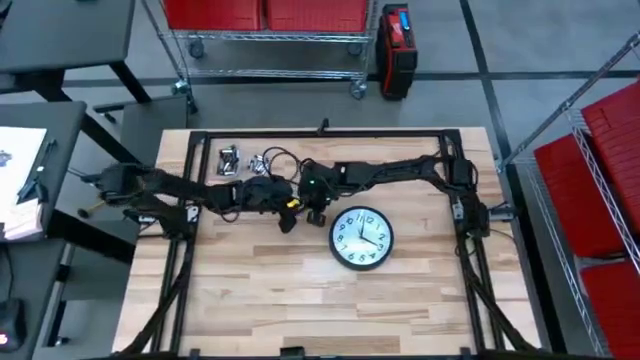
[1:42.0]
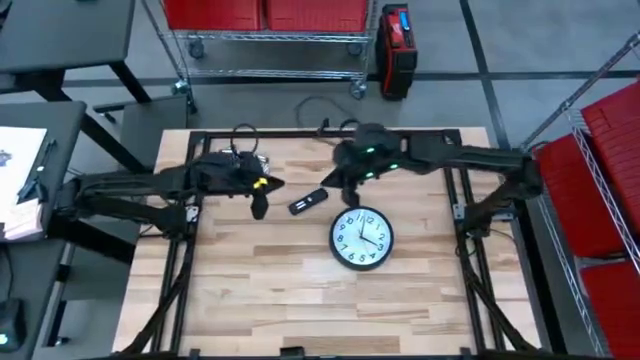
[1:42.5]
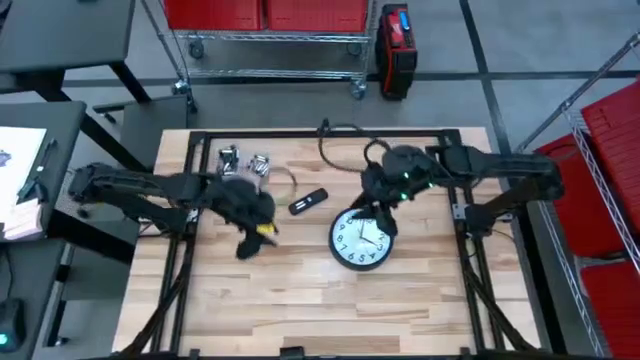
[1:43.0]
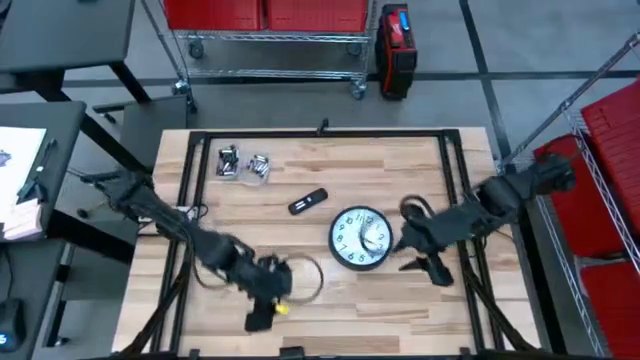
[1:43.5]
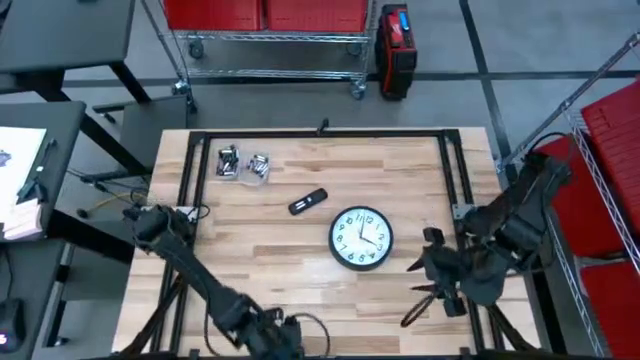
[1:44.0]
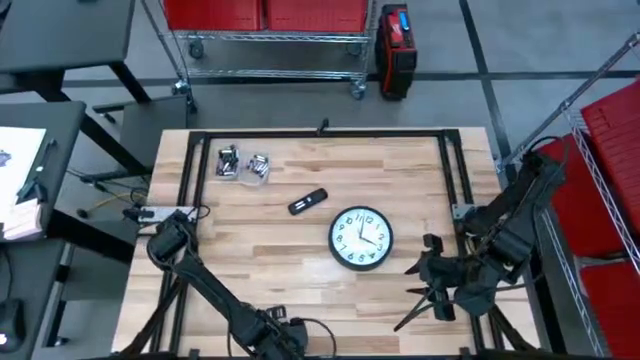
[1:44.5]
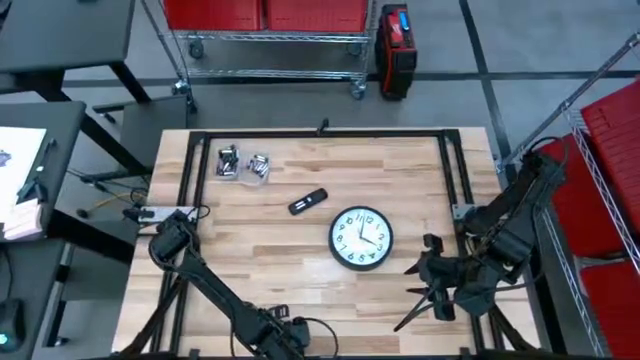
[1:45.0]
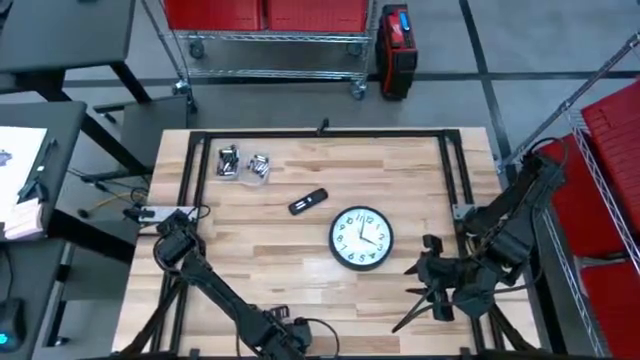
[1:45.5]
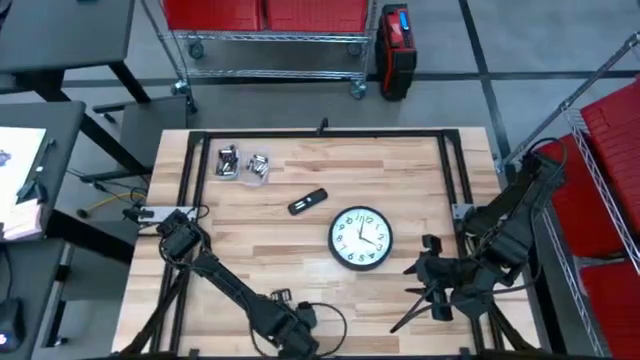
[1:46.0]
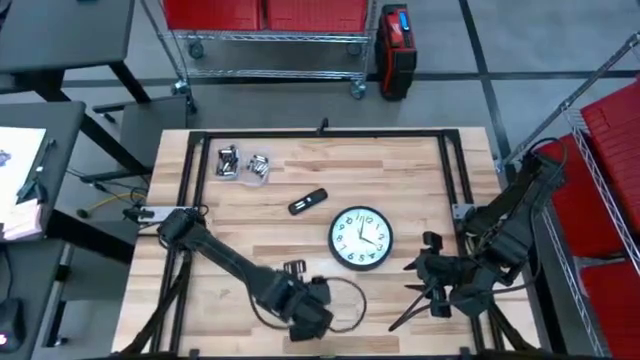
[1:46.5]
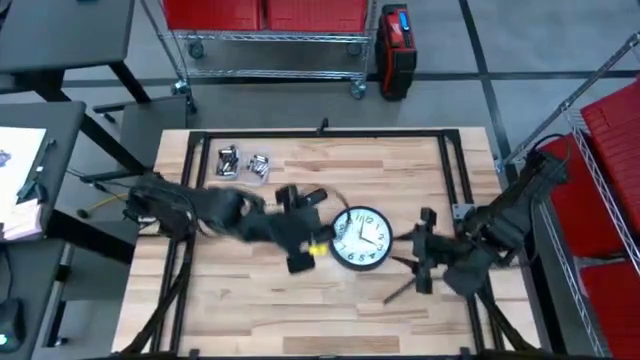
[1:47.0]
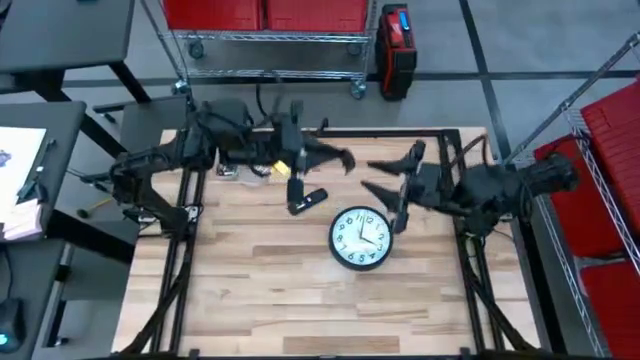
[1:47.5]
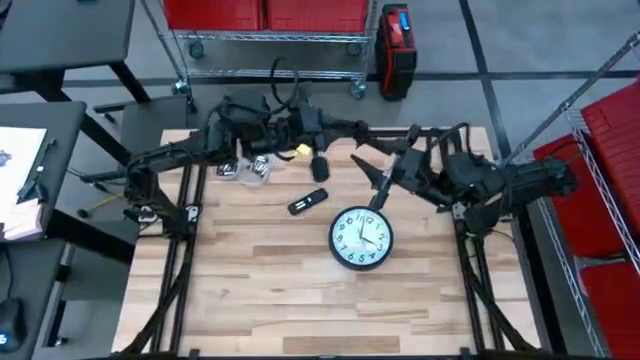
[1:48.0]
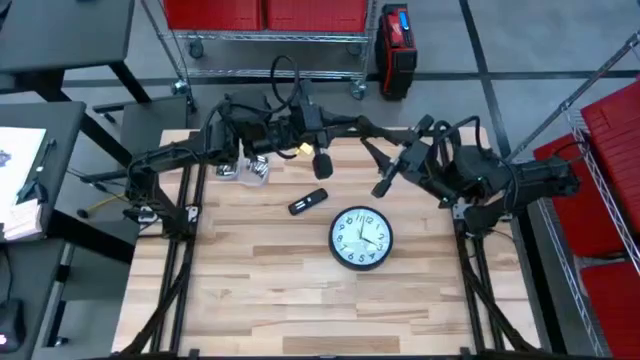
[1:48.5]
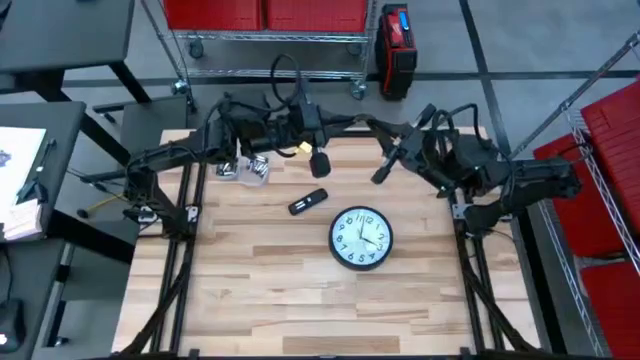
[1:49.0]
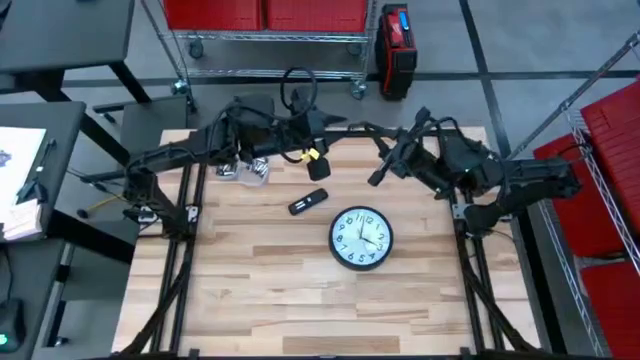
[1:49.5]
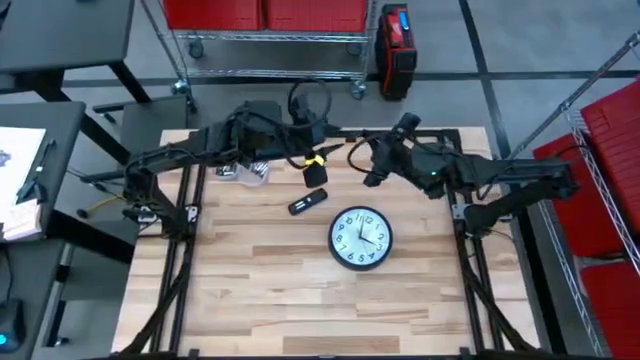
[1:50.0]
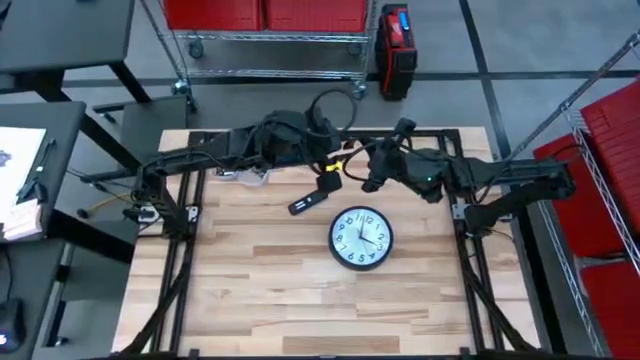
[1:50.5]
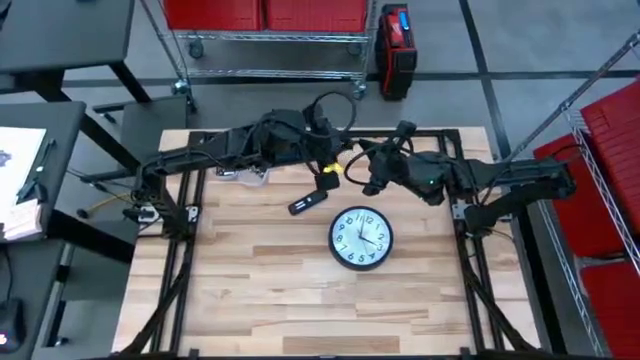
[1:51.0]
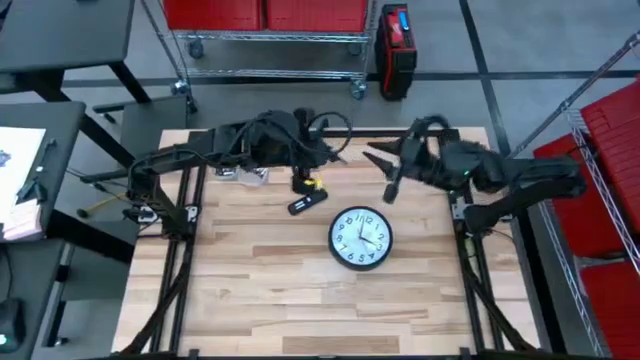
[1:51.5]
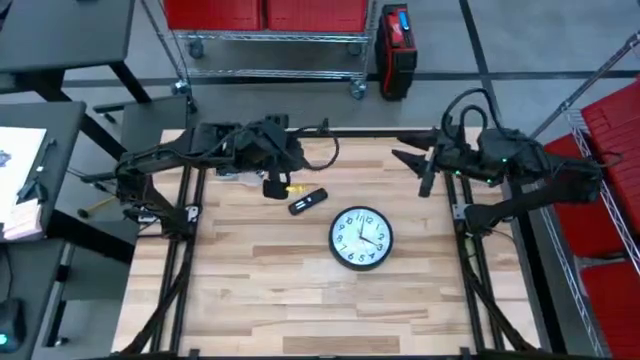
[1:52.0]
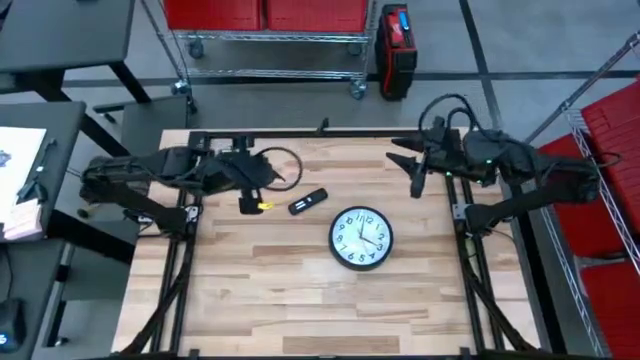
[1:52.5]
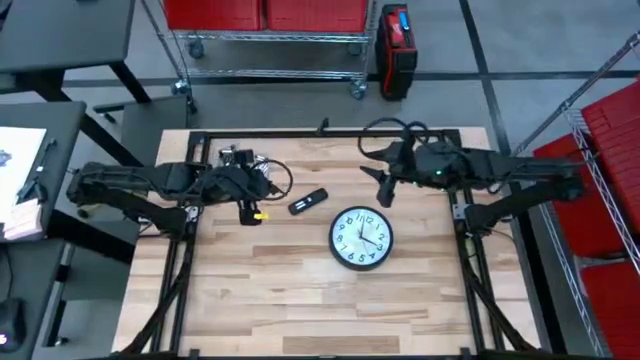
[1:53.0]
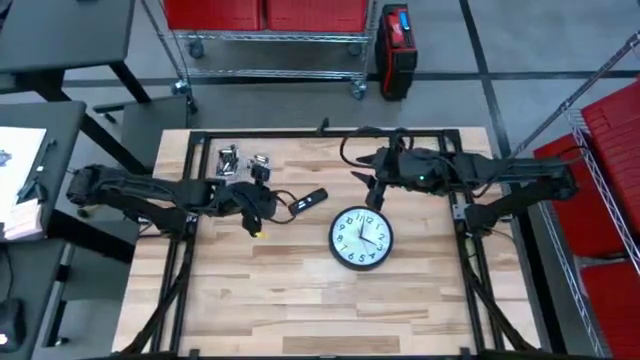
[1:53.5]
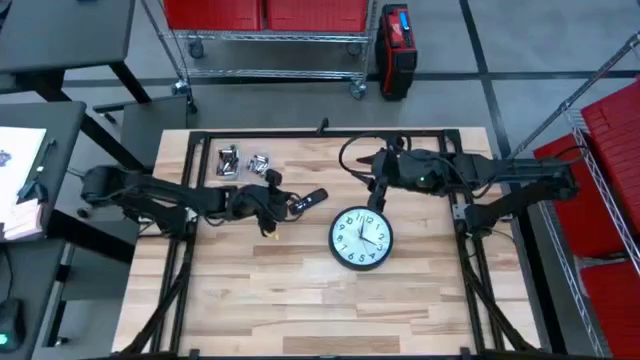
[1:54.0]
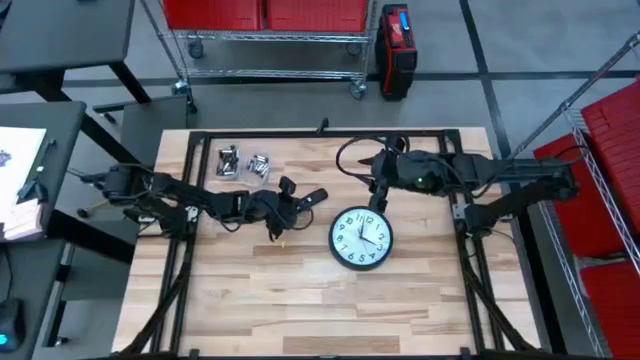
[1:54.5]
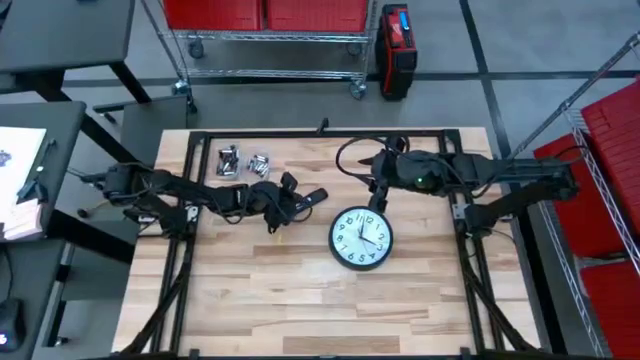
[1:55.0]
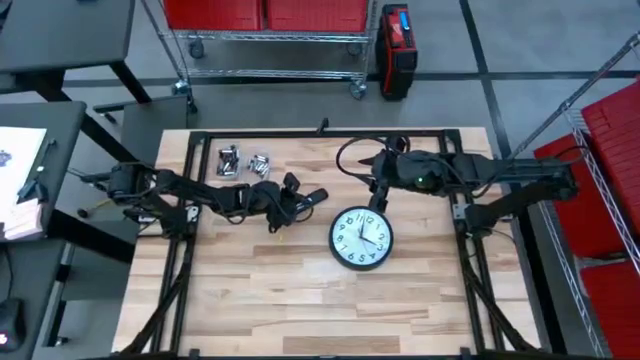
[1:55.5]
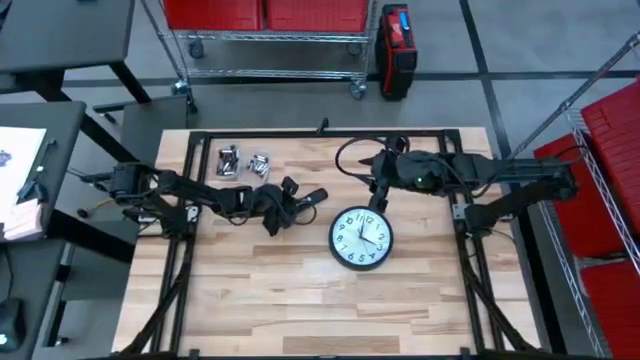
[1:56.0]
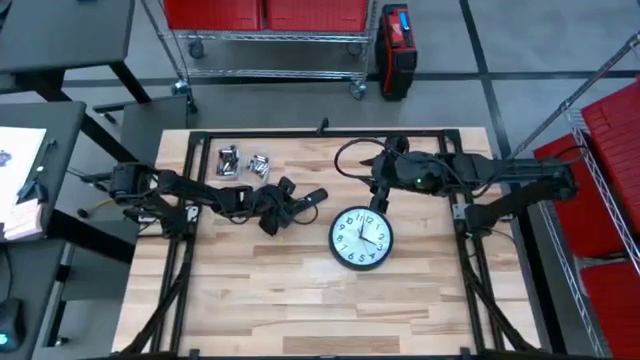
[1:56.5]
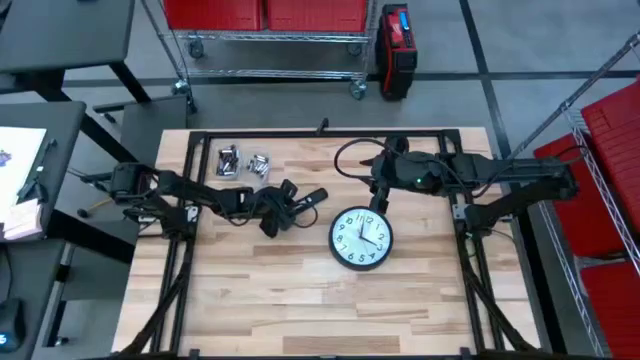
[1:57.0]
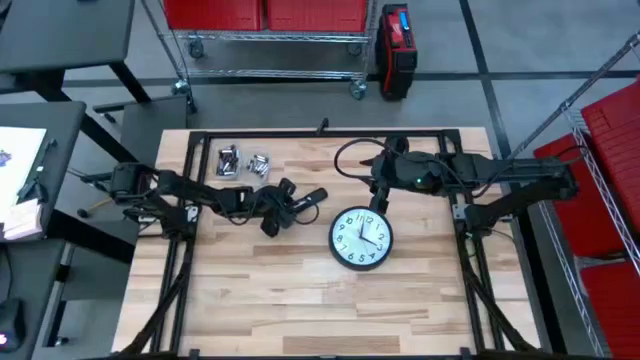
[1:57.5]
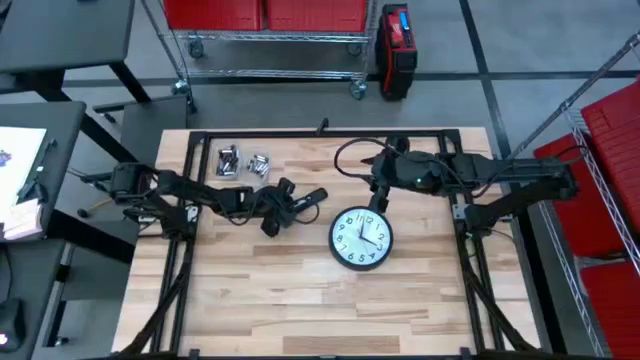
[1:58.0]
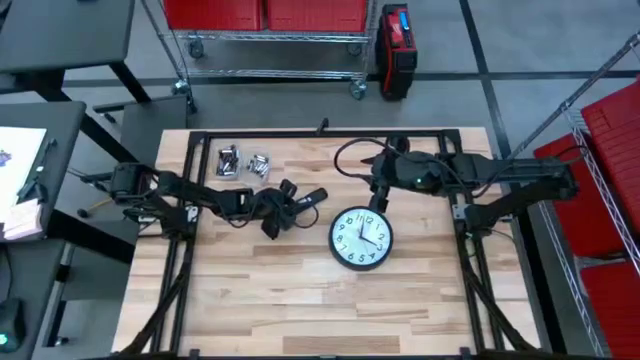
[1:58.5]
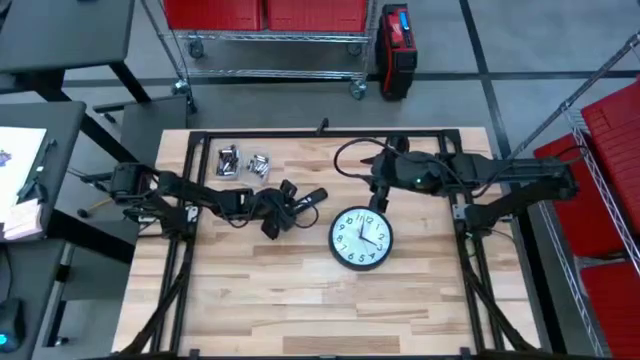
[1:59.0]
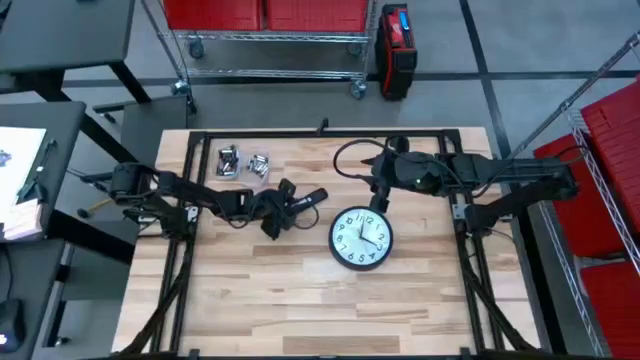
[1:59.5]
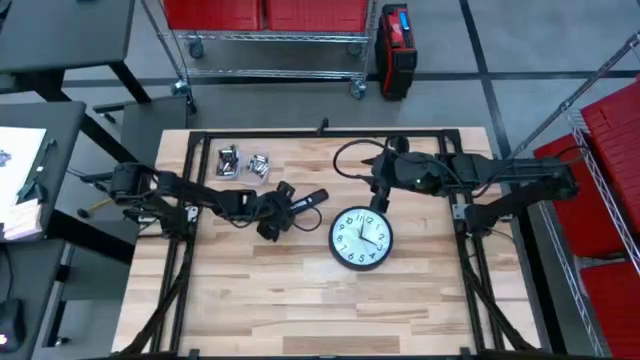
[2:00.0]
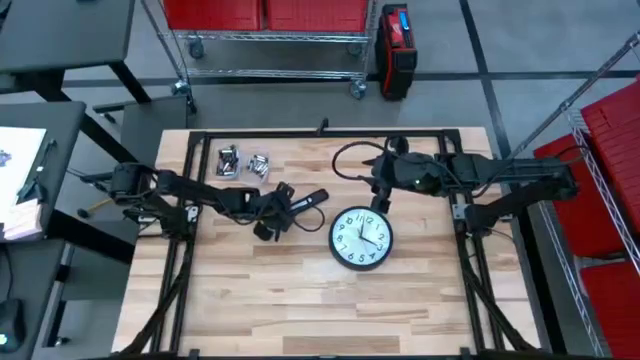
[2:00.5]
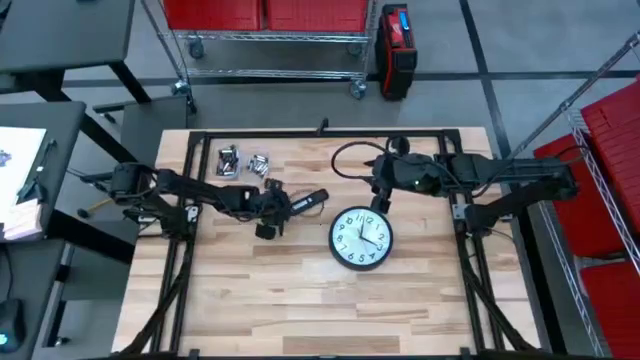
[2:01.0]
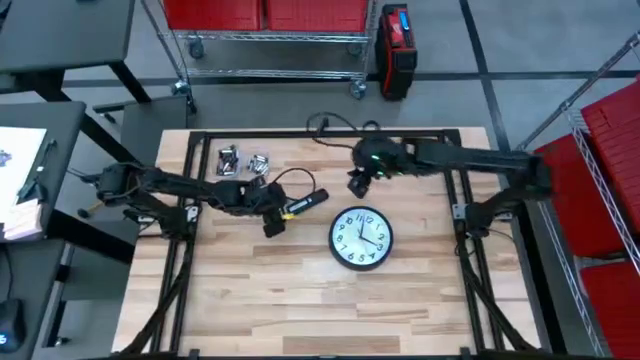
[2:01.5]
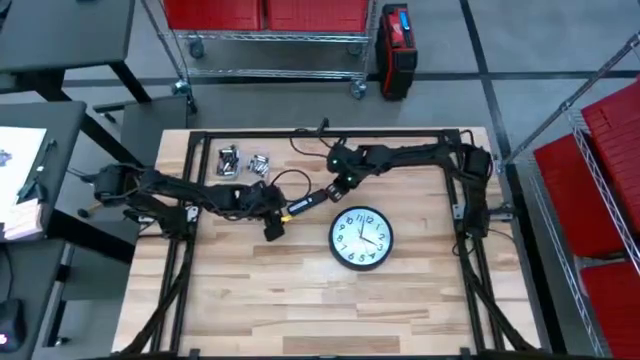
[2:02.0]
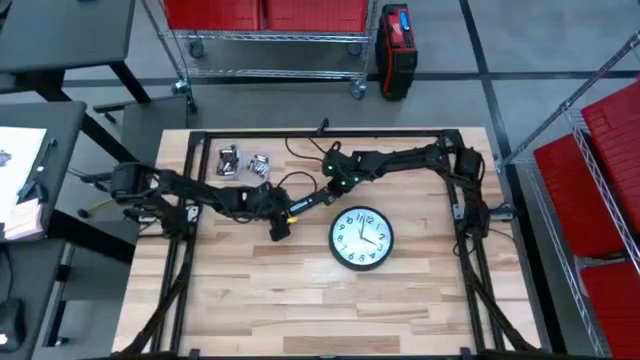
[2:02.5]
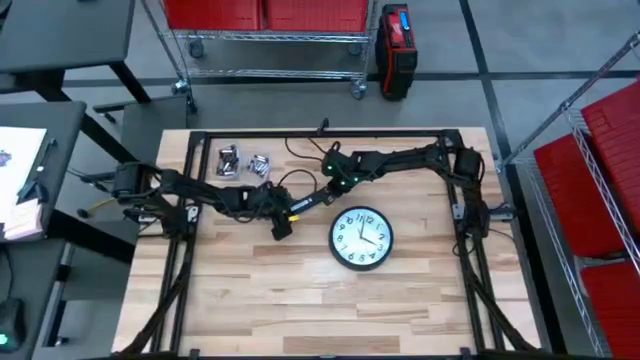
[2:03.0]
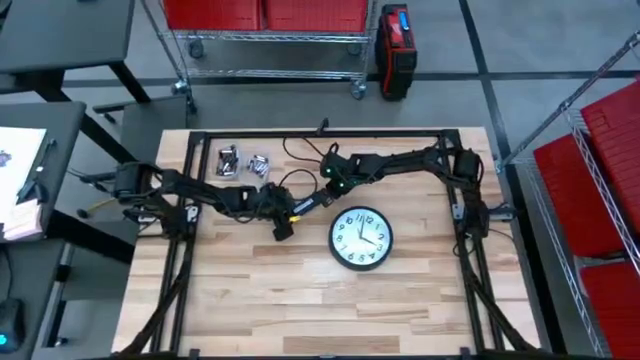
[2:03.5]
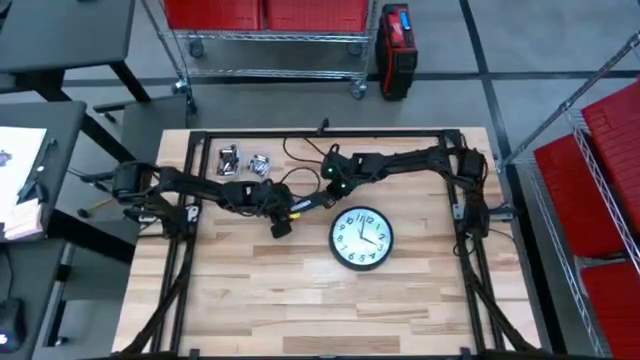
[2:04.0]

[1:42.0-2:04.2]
Task: Insert battery
Close the remote's battery cover
